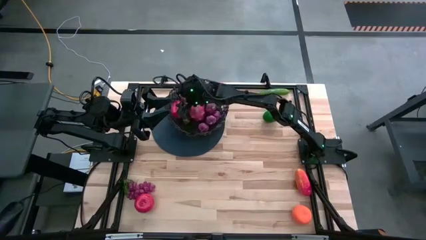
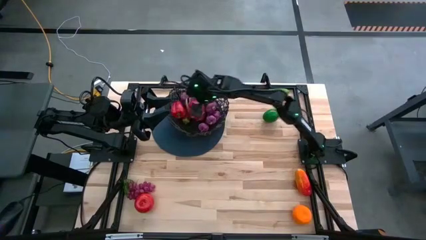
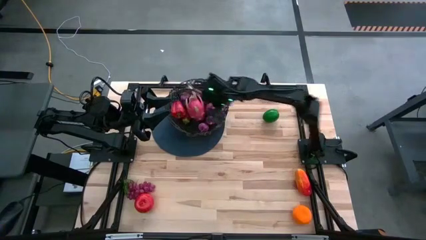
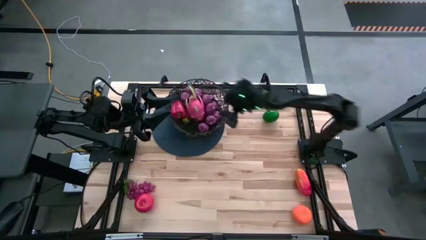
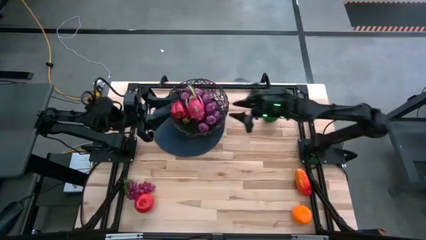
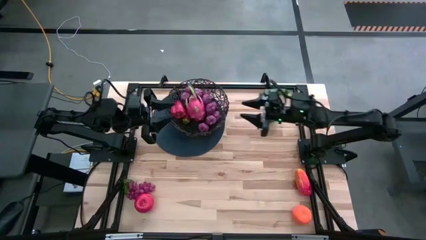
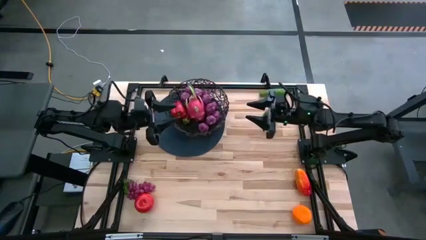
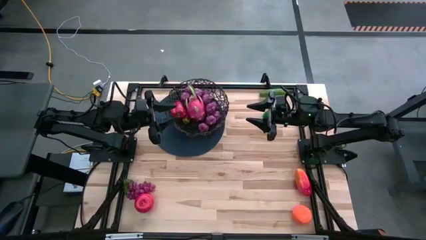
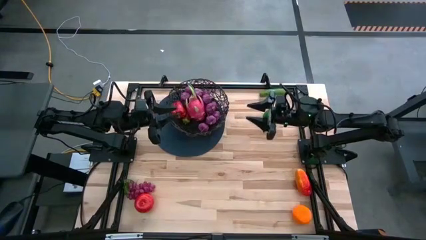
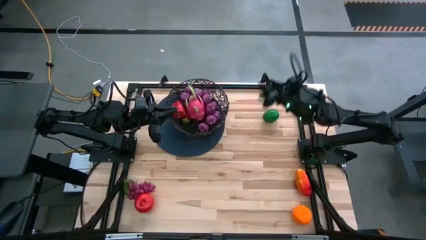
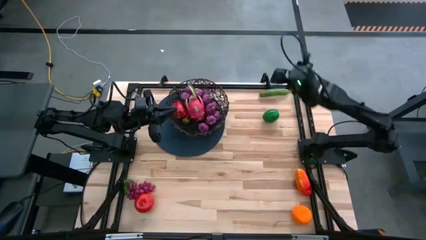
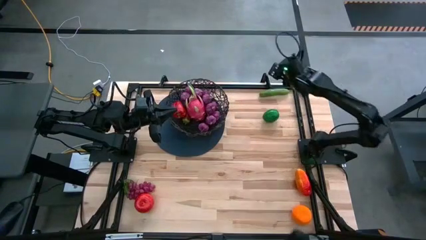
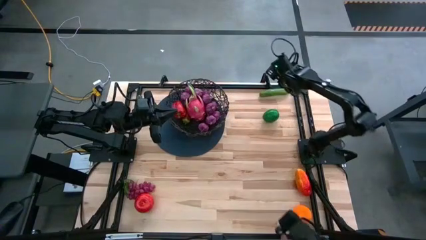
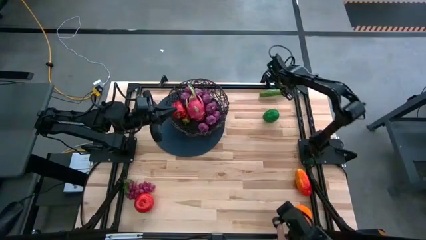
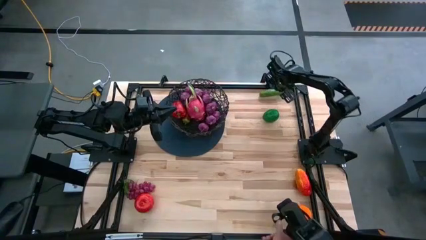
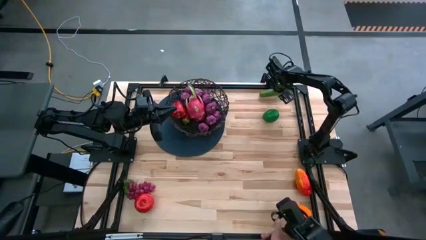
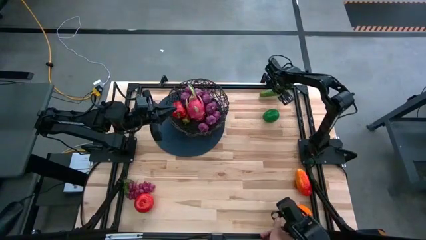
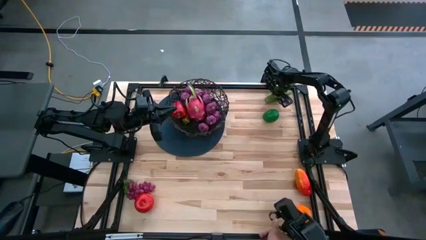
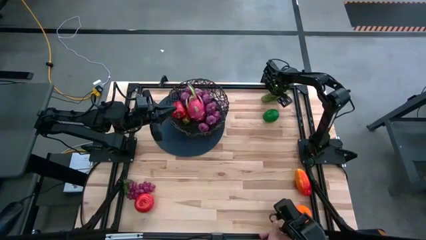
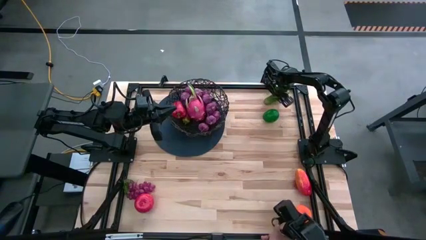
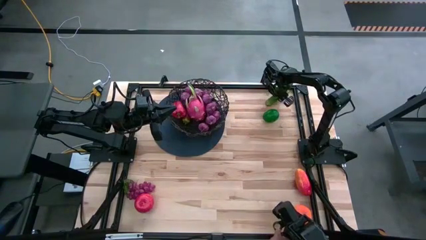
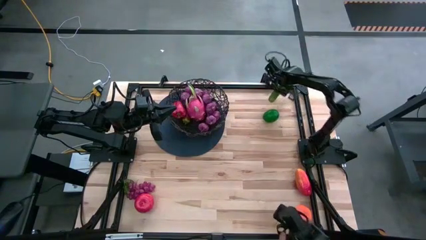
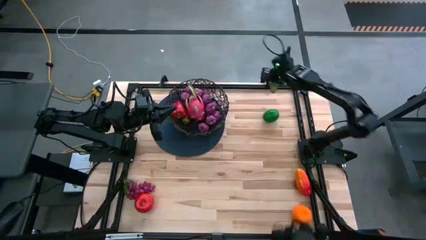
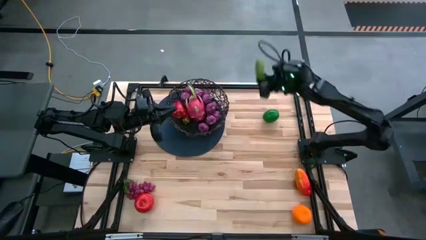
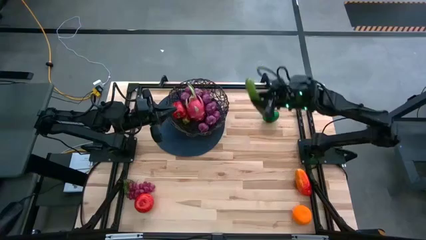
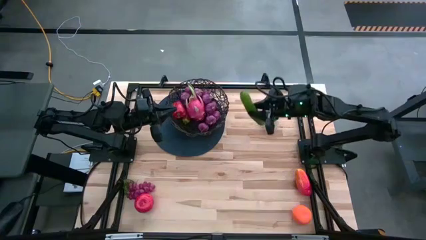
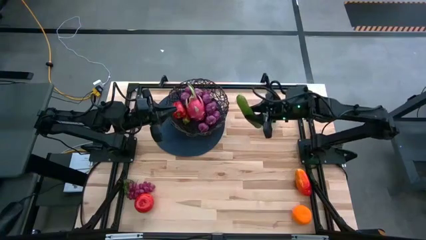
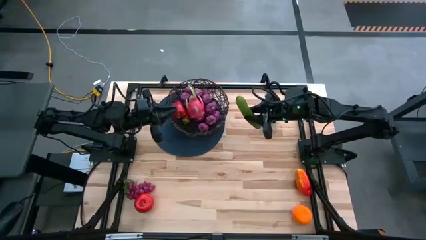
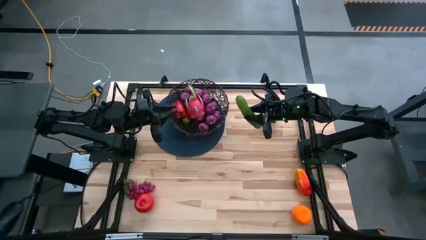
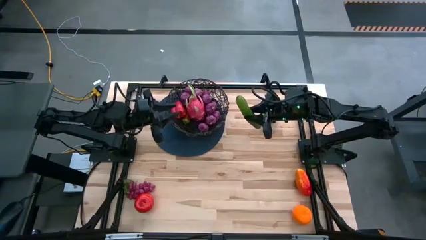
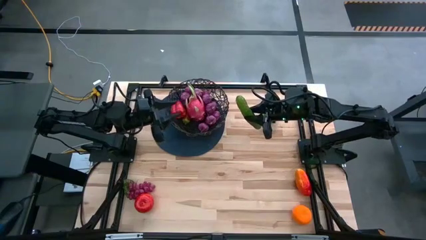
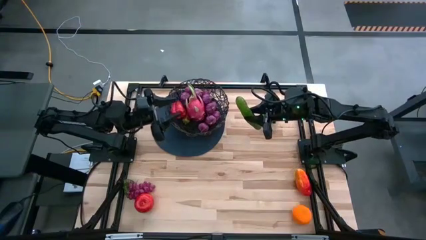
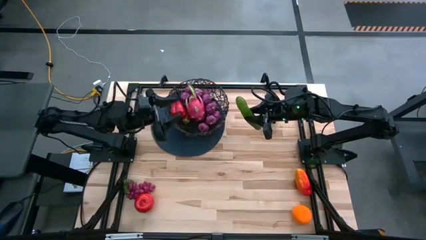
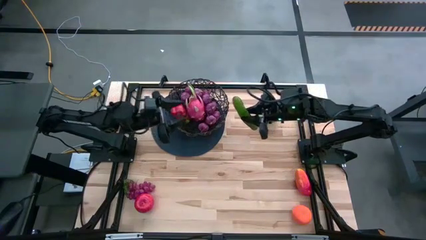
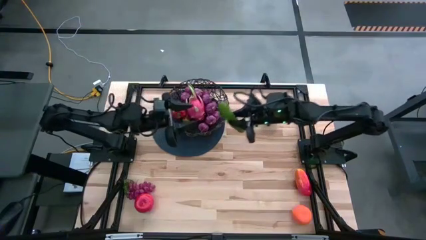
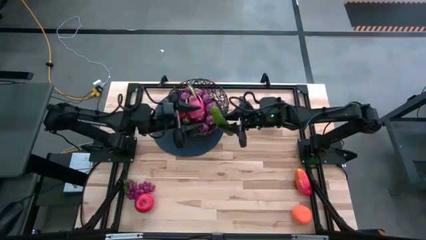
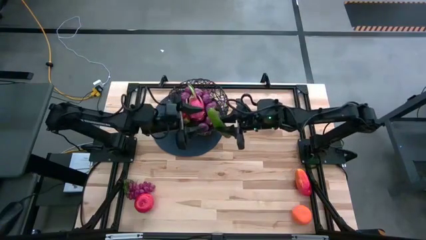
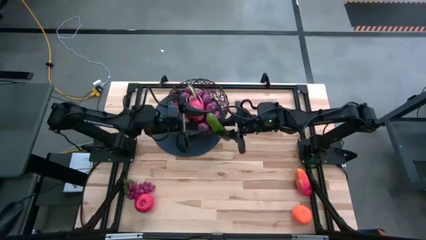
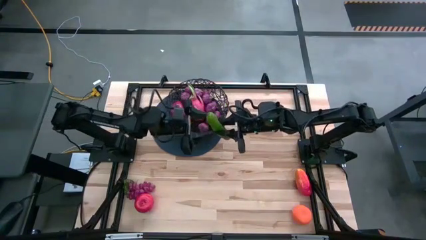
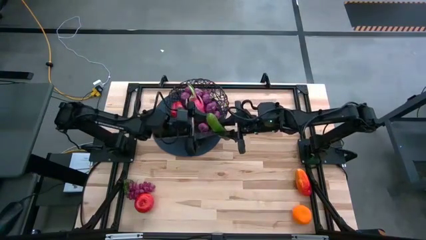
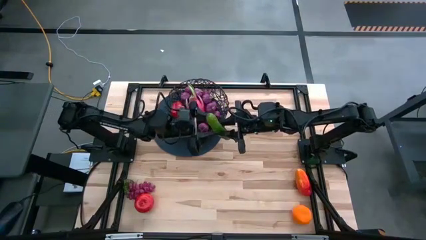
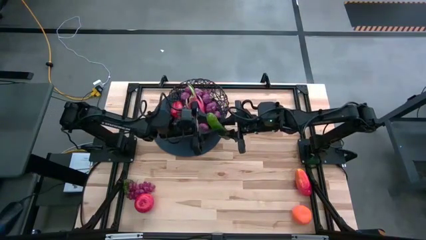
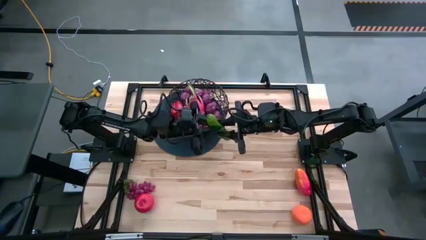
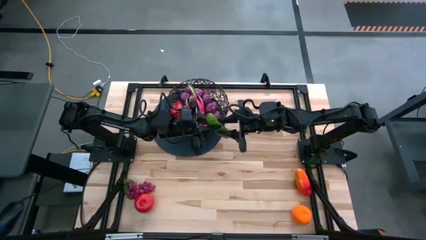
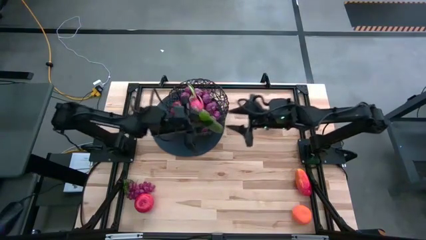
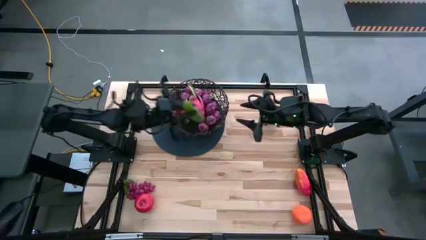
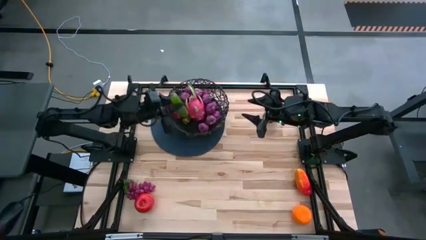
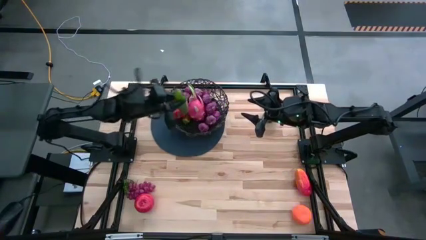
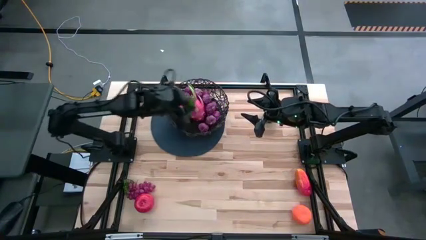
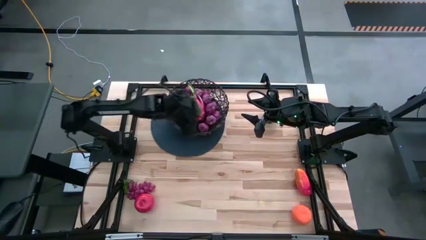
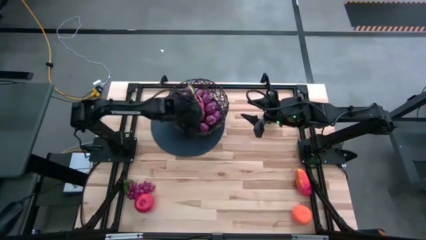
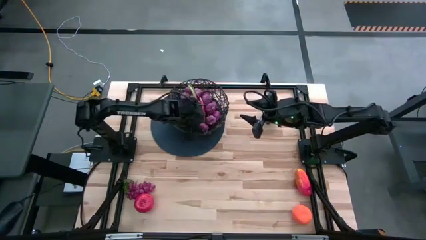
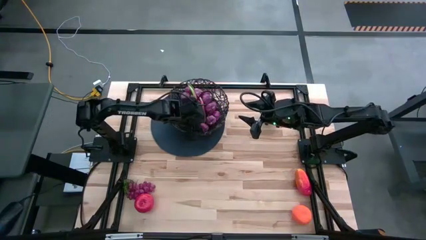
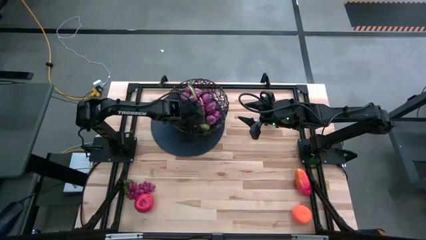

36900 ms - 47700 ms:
Task: Build produce basket
Put the green cucumber into the black basket
